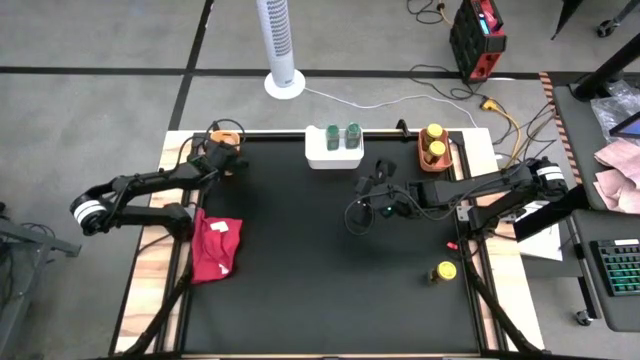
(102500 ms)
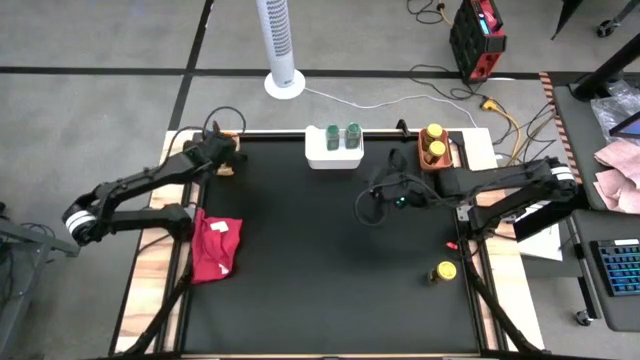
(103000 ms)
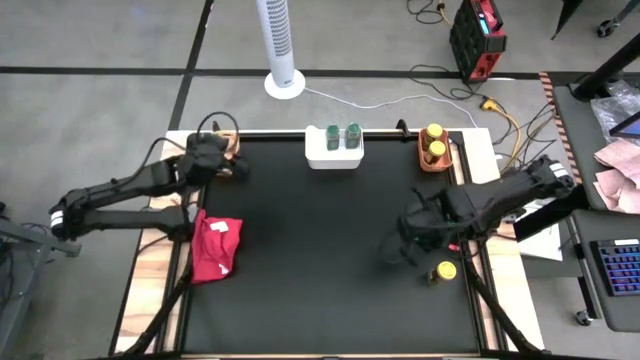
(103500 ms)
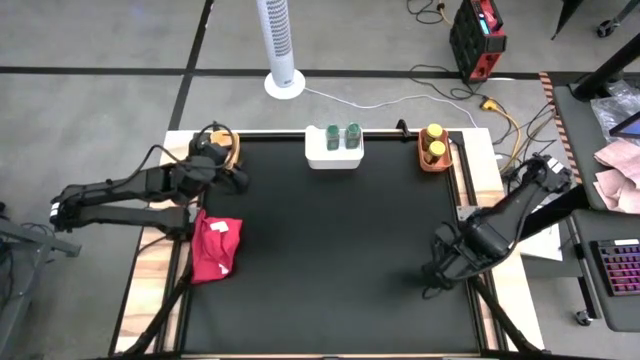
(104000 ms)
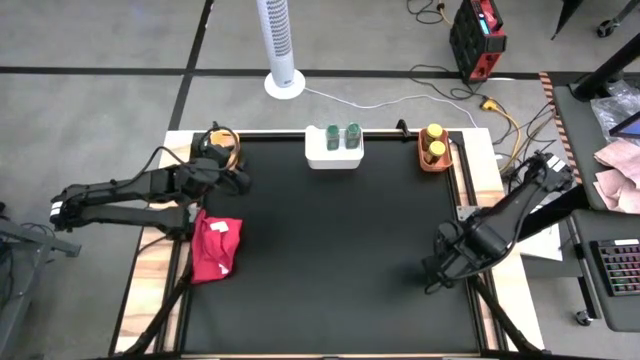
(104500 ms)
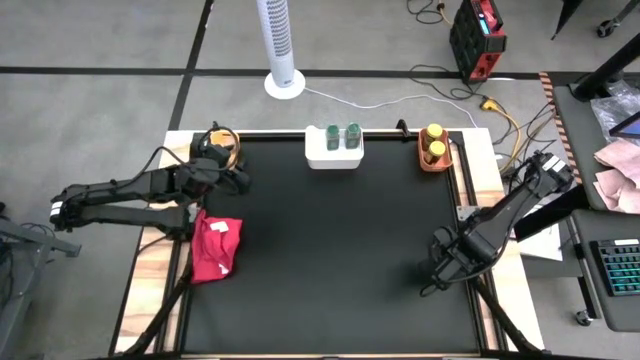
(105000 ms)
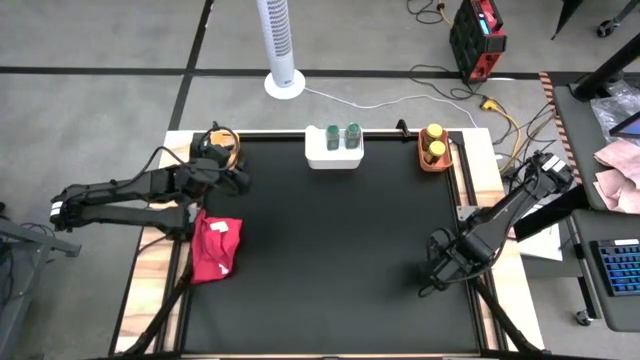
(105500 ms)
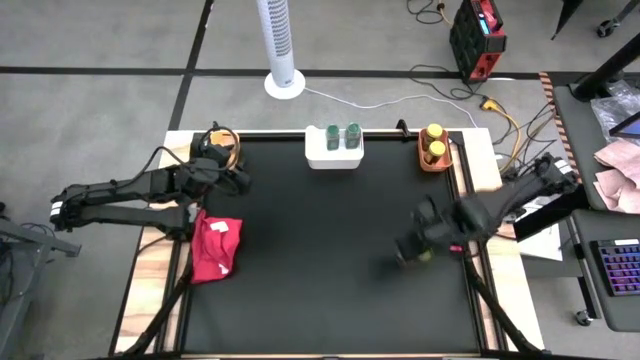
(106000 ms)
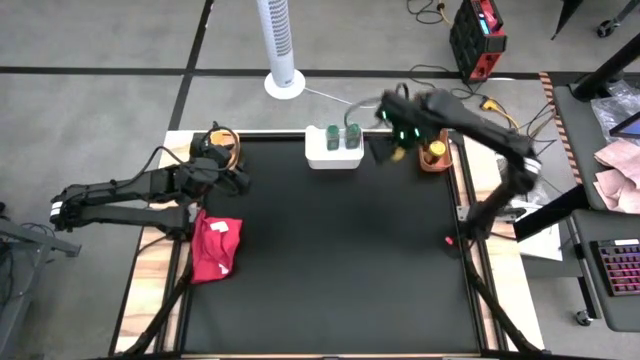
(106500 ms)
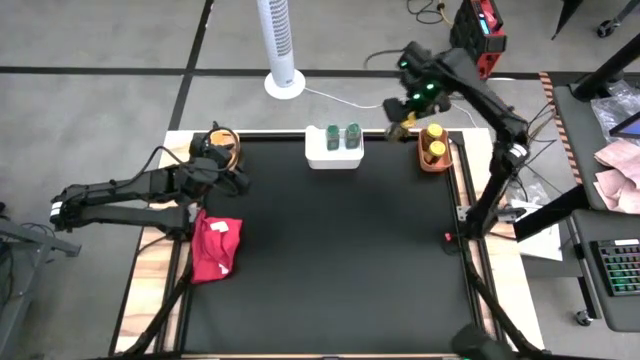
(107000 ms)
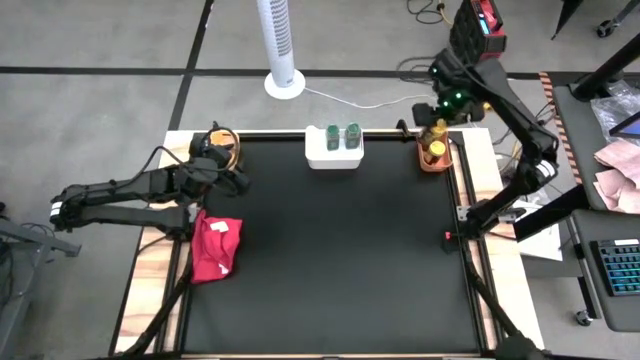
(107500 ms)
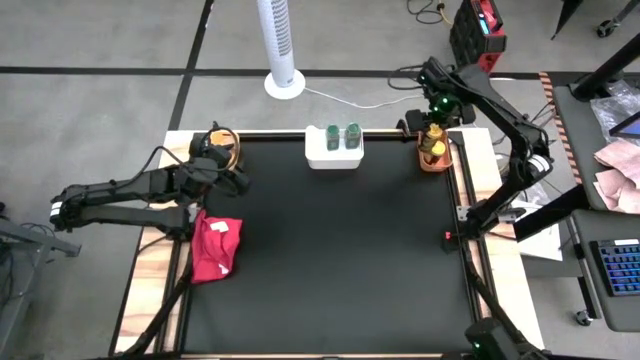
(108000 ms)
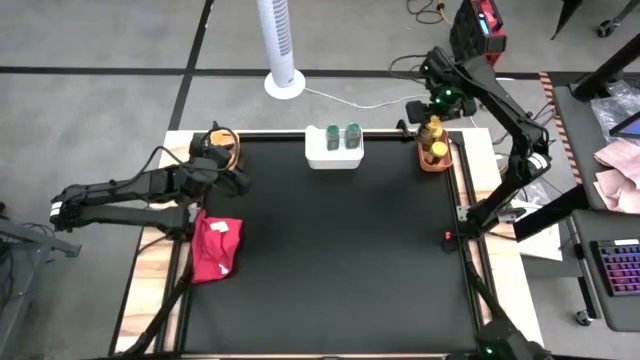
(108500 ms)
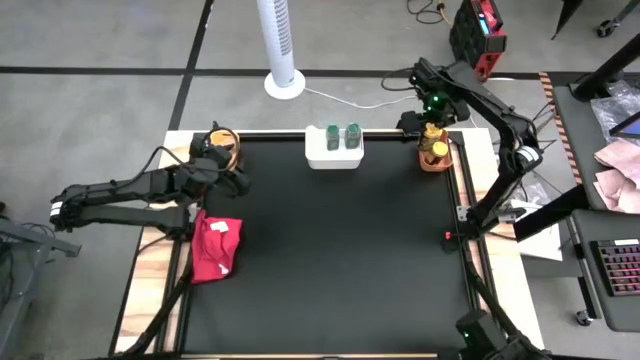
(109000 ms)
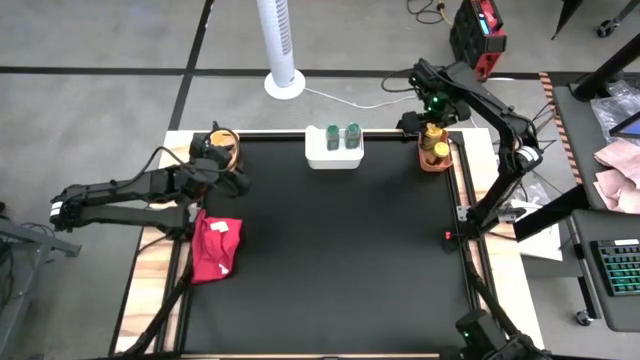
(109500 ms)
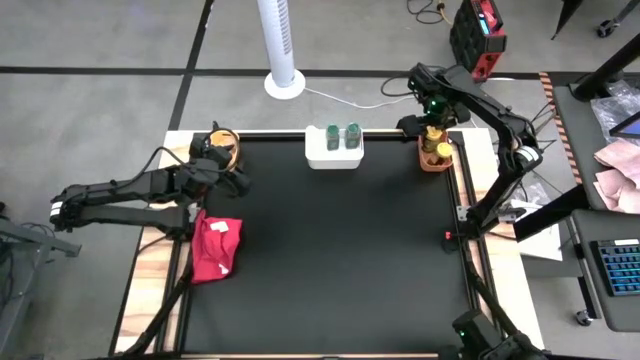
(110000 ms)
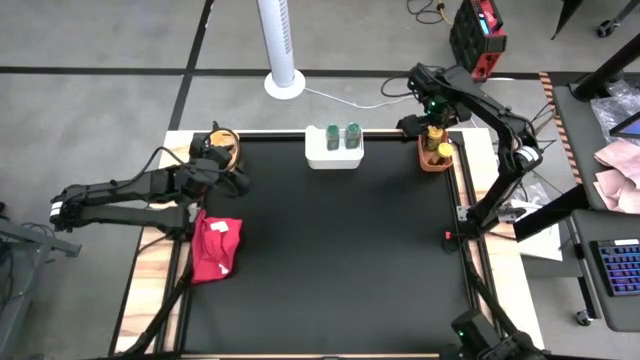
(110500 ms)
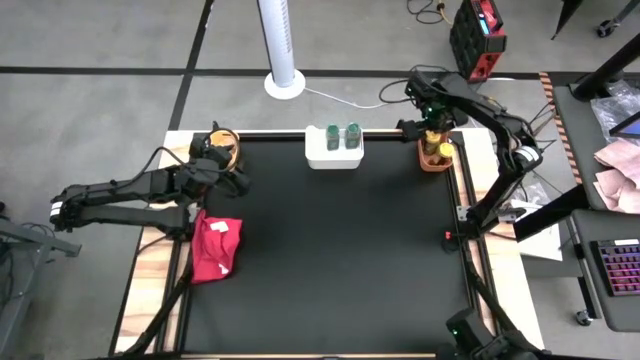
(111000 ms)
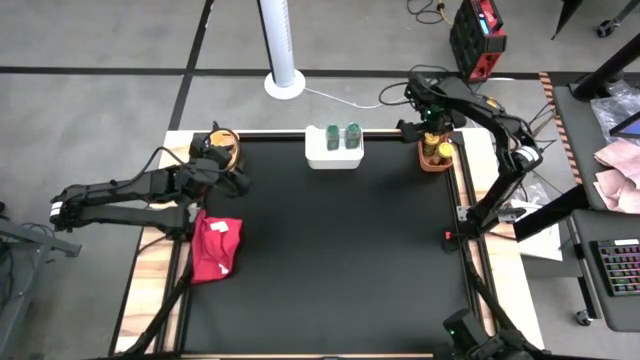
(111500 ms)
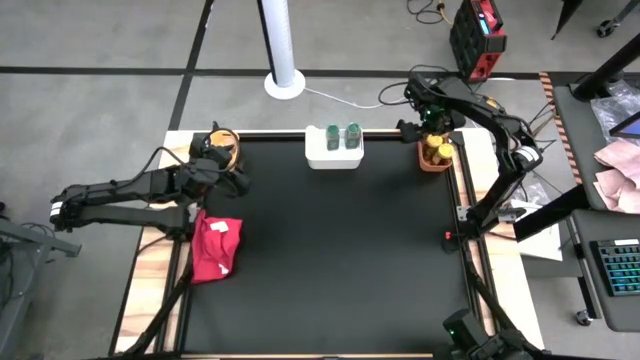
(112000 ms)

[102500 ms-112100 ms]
Task: Sort spices by type
Put the dark brown spice bottle into the orange bin

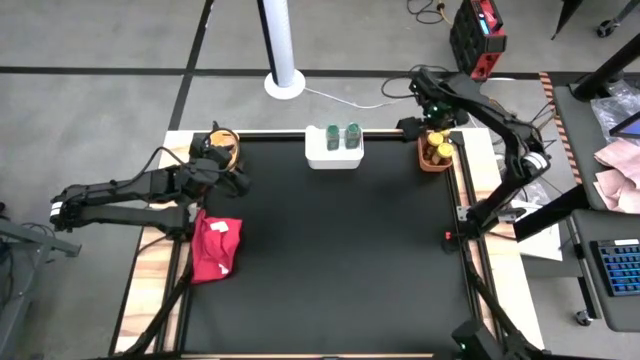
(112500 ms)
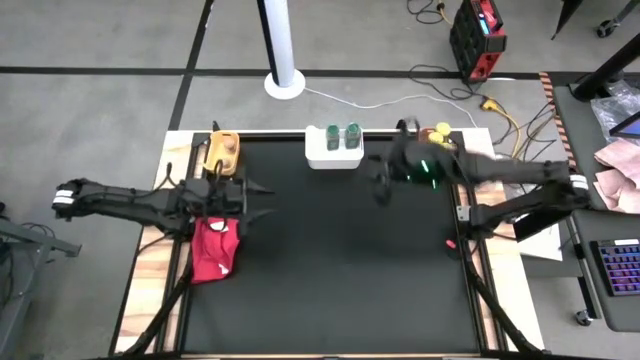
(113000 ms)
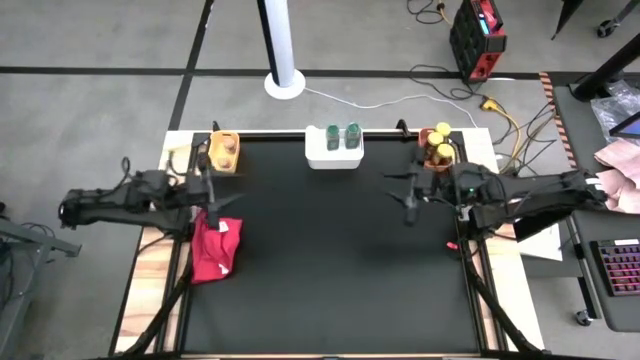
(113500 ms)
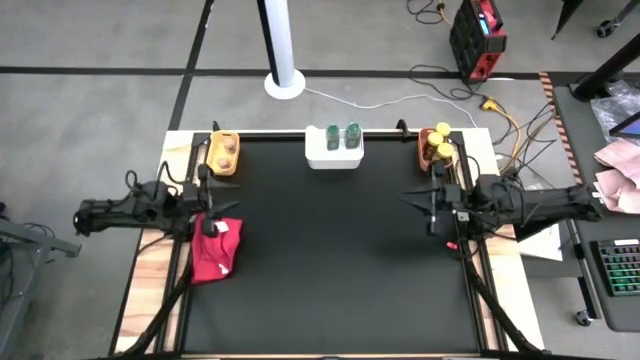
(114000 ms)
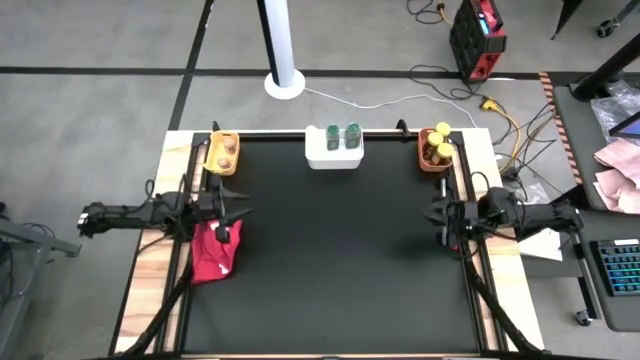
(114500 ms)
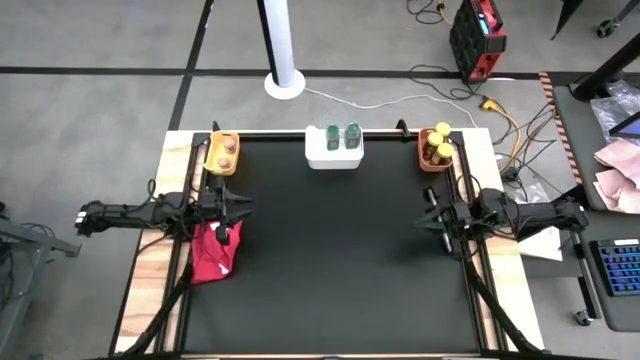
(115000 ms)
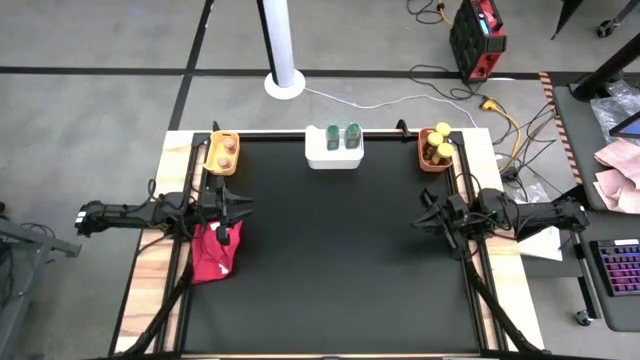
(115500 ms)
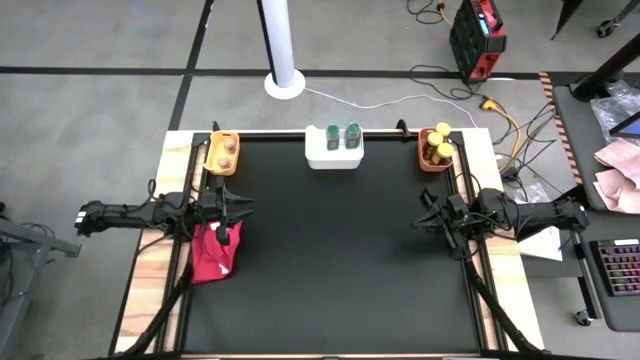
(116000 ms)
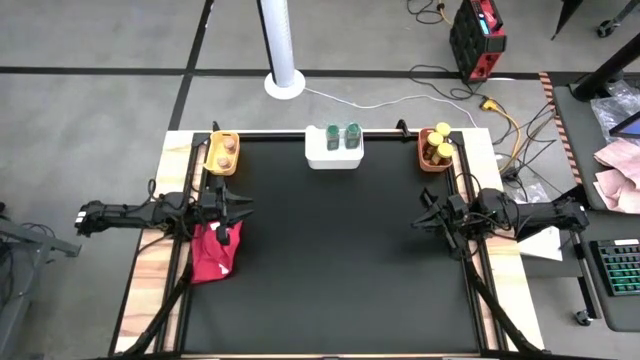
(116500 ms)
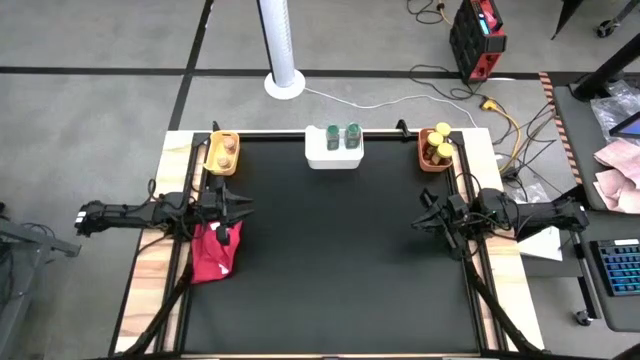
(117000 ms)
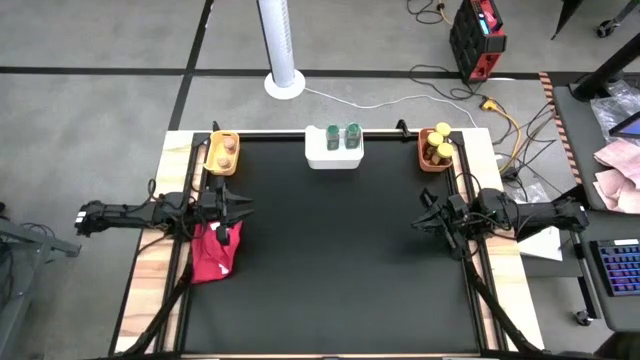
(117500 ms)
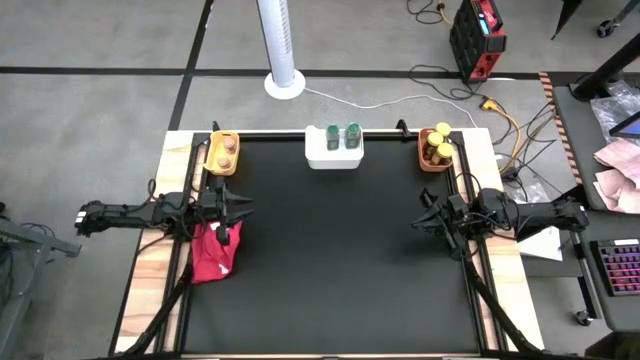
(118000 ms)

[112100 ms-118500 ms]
Return to Home Position

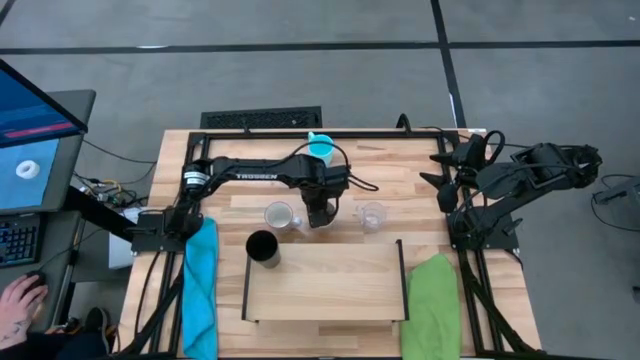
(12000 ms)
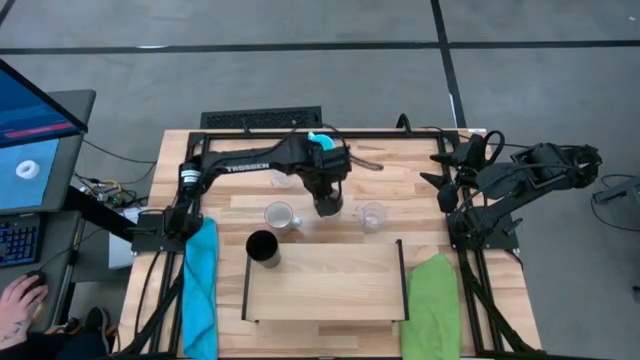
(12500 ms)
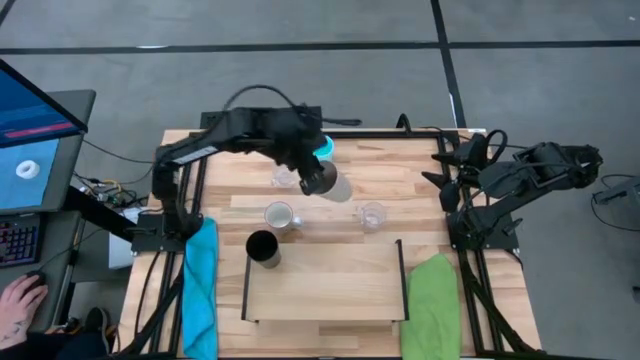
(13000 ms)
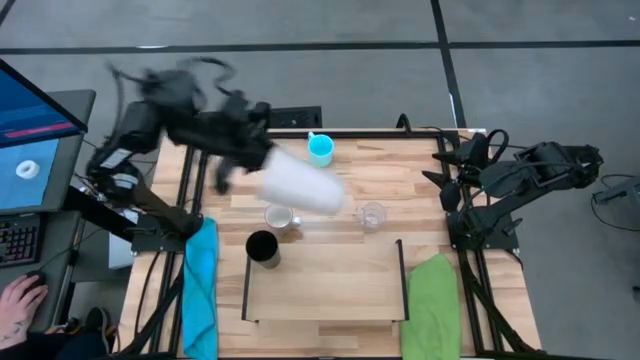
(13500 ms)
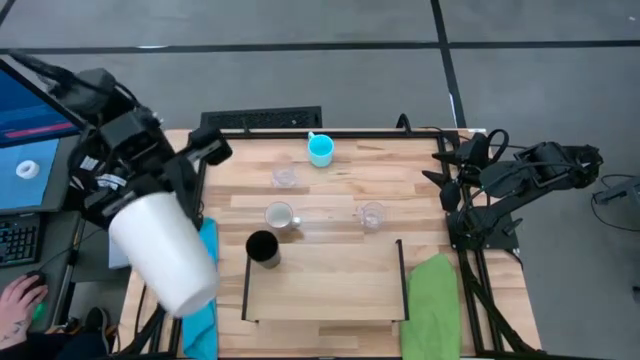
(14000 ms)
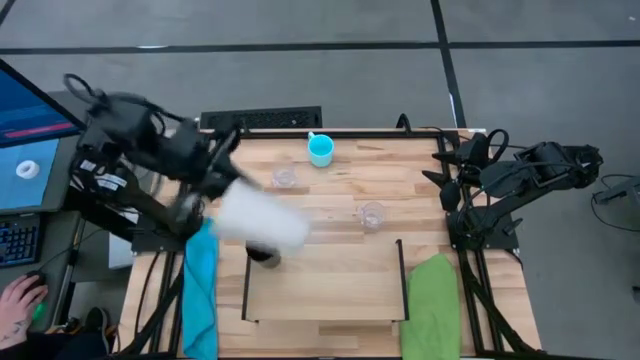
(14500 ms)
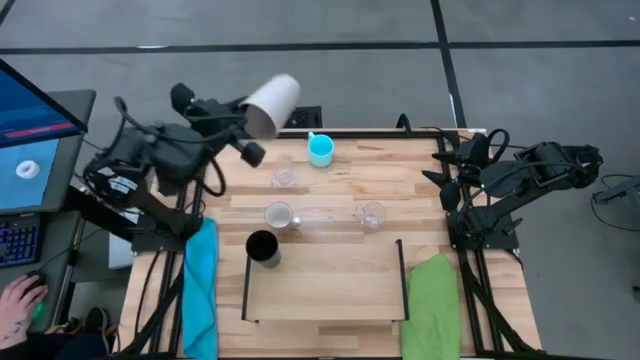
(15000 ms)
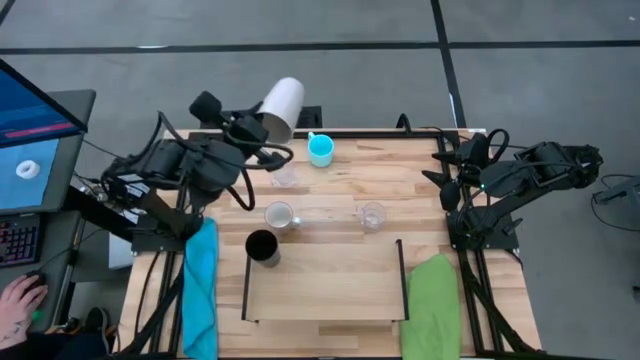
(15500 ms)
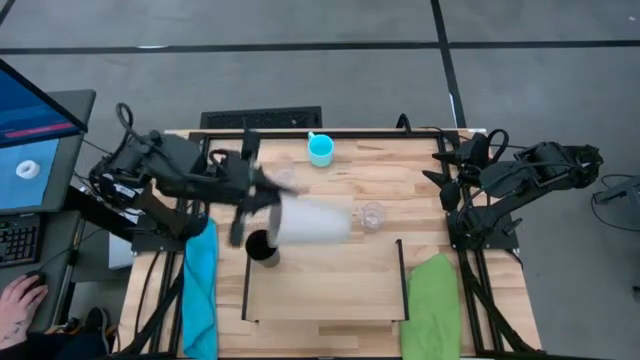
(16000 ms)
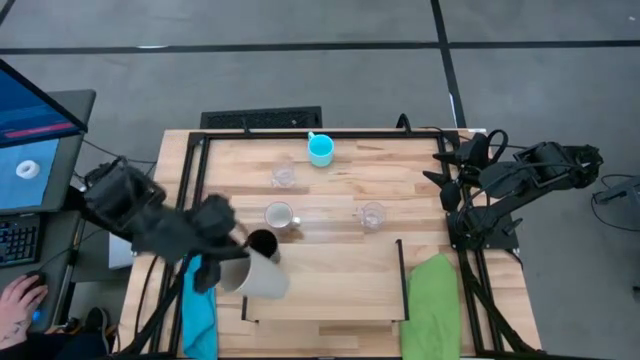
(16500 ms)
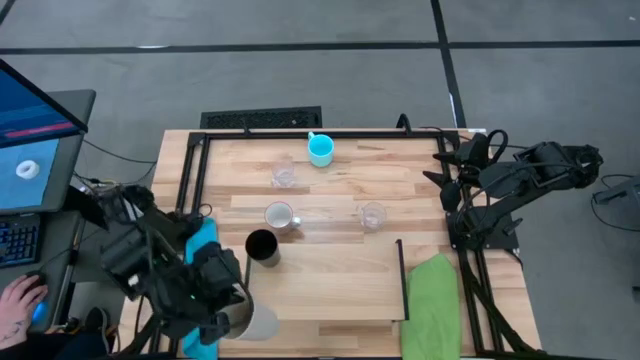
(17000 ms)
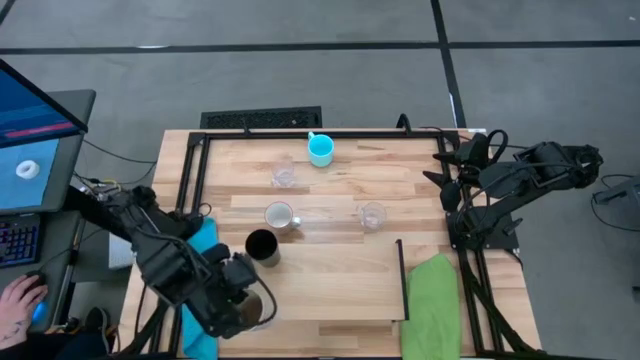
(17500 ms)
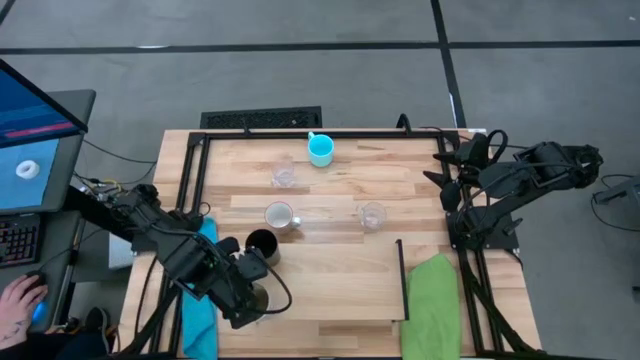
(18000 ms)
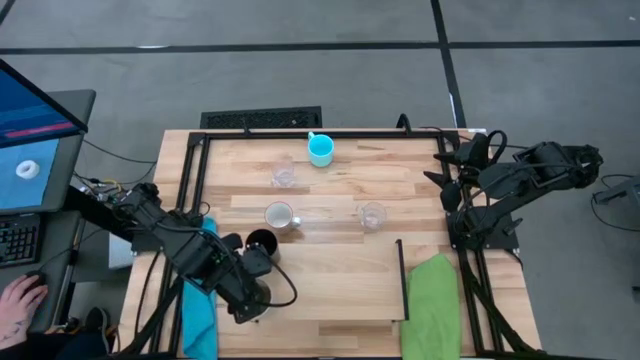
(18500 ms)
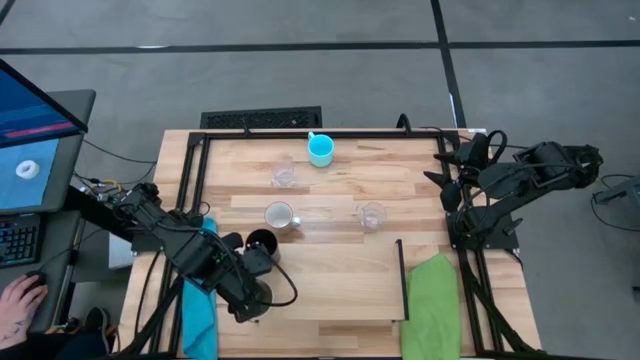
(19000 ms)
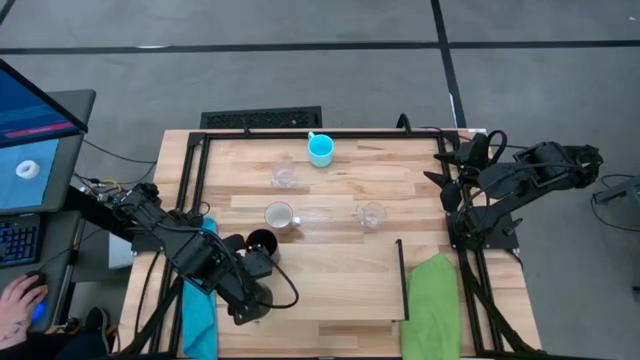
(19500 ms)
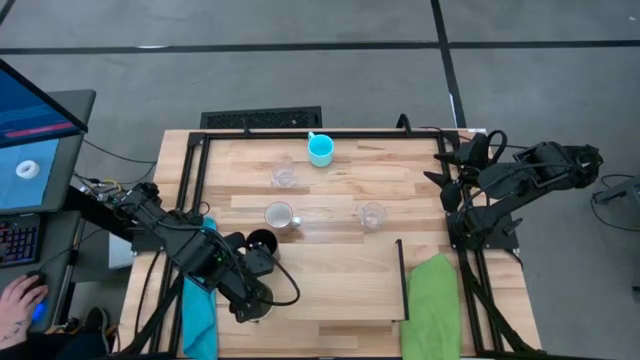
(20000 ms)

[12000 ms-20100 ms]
Task: Stack small to large cups/mugs on shelf
Put the white cup on the shelf
